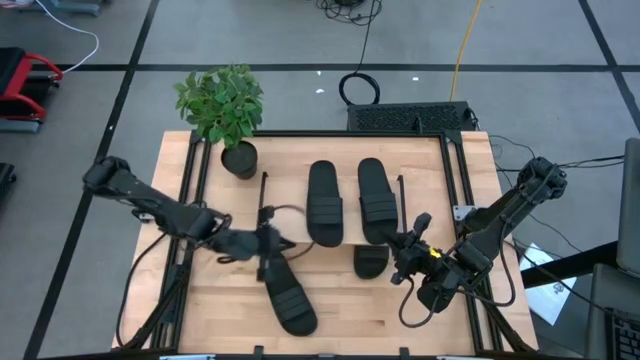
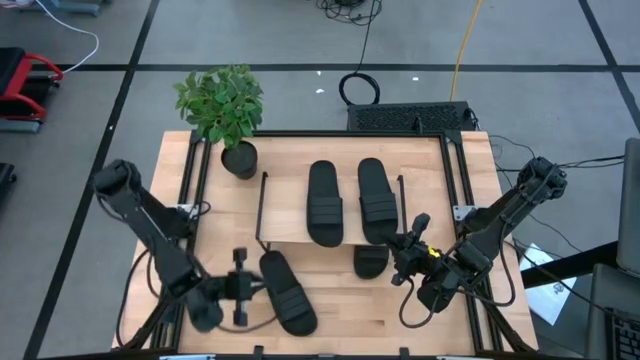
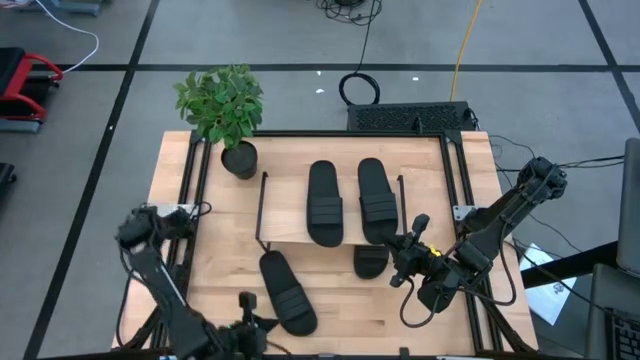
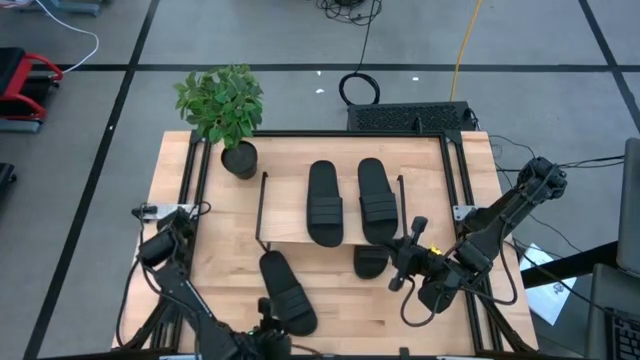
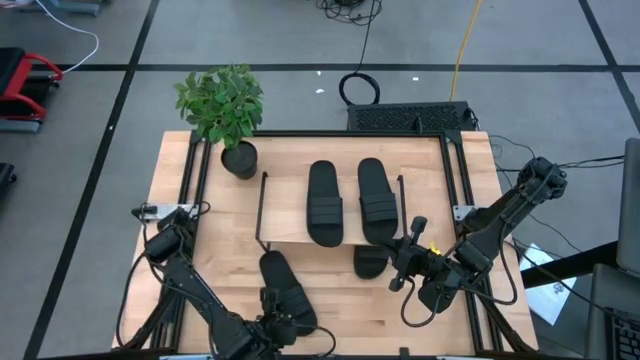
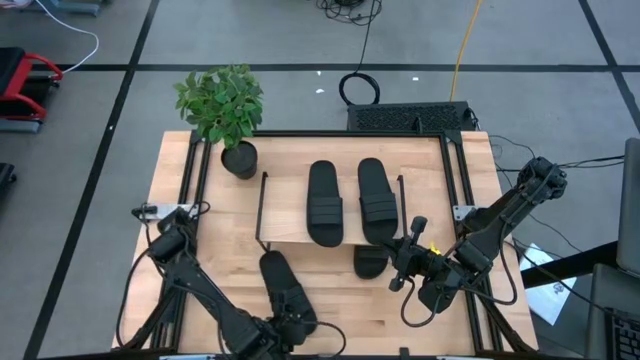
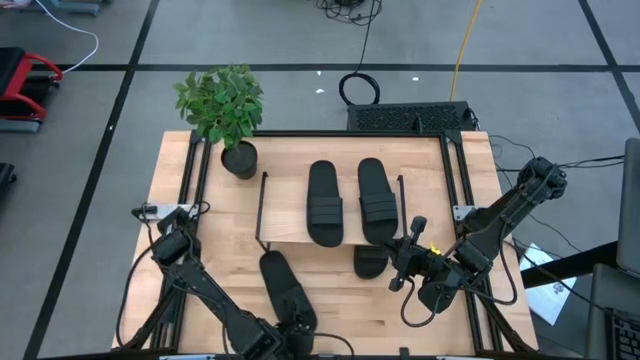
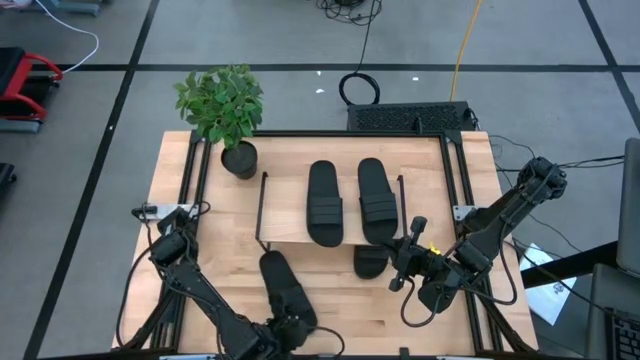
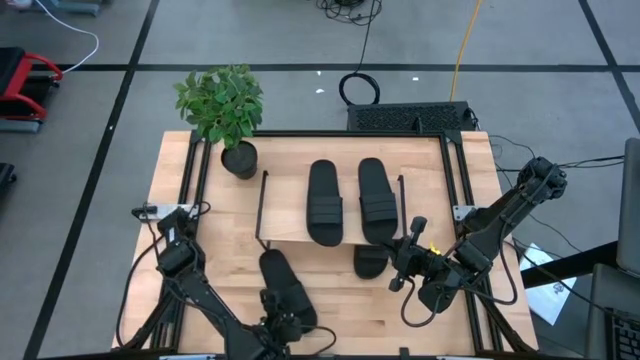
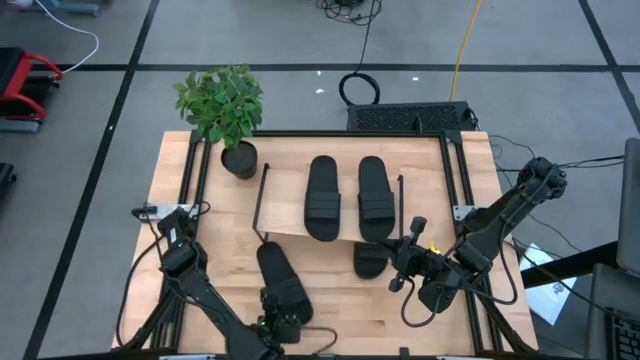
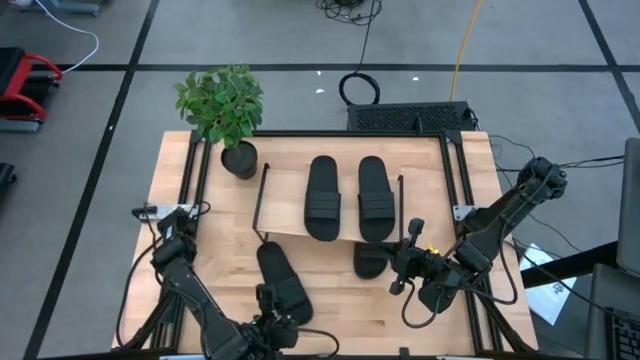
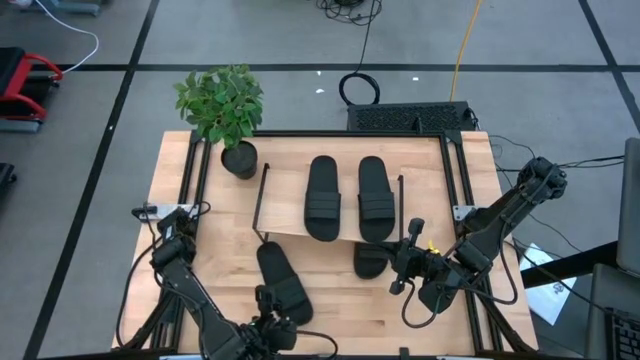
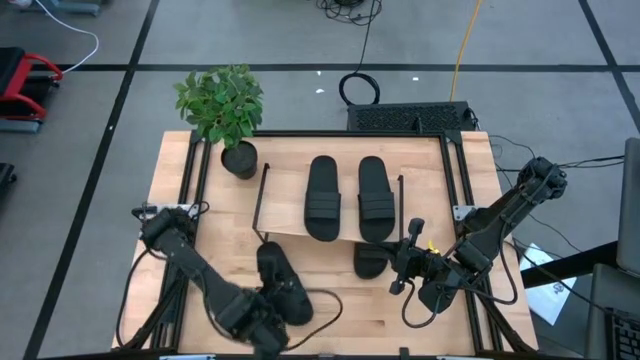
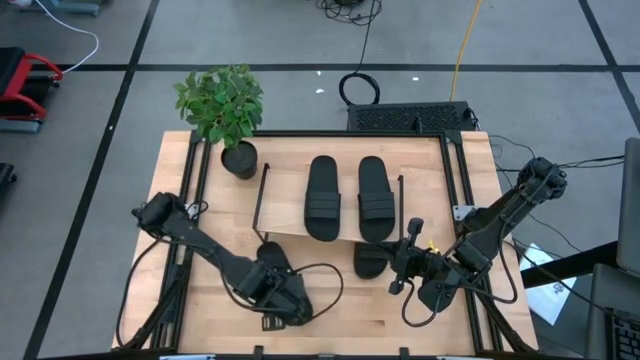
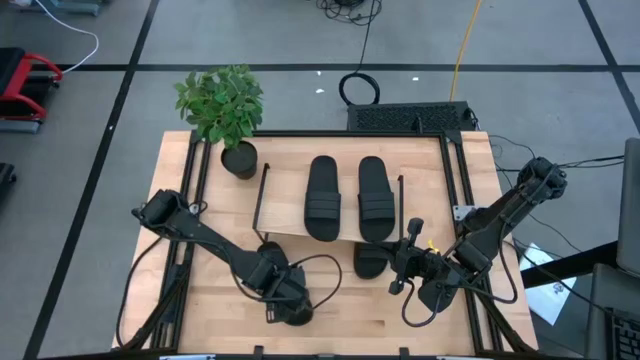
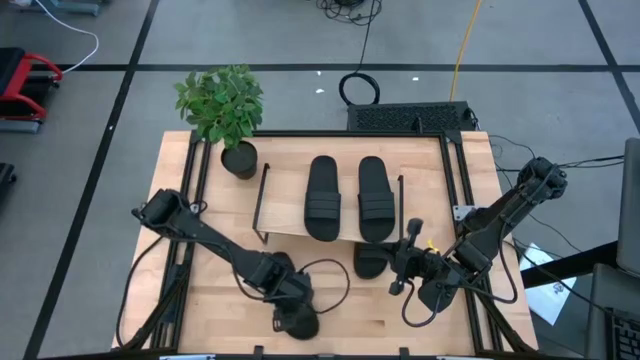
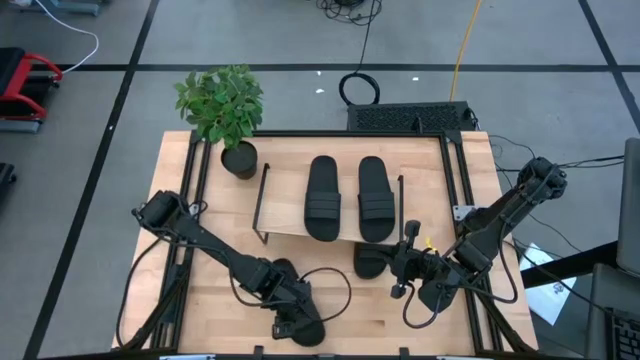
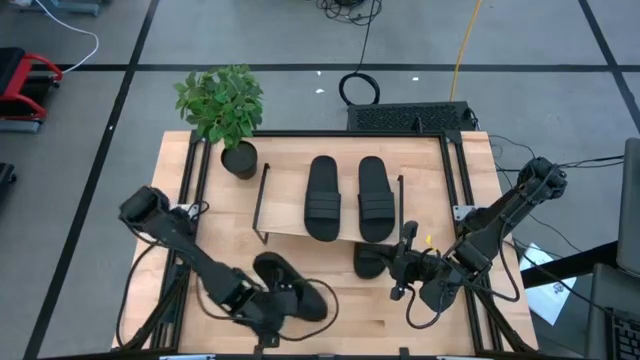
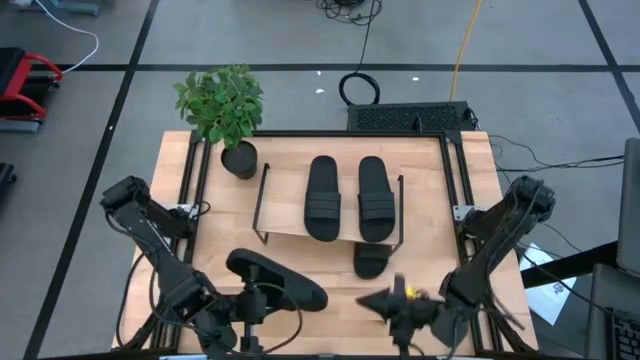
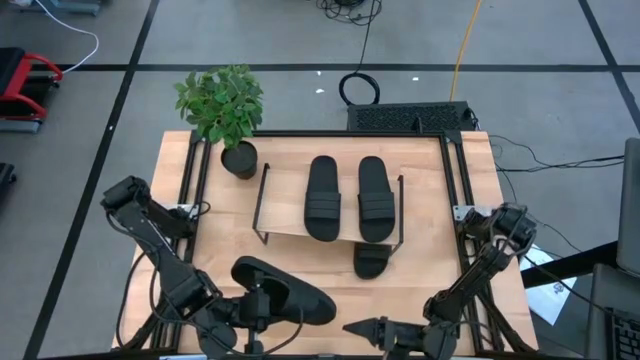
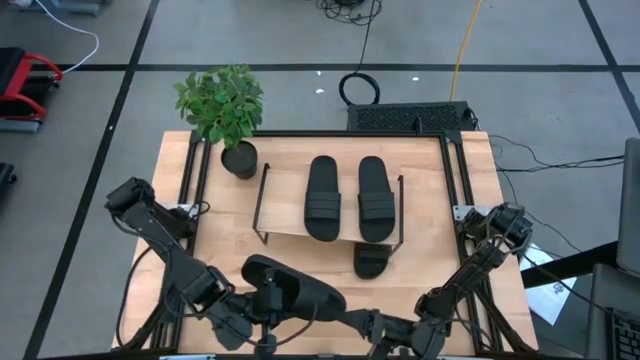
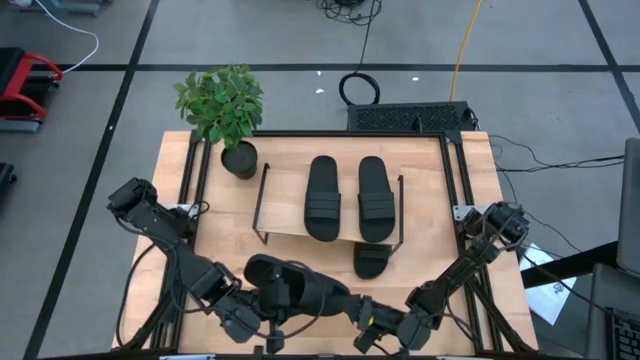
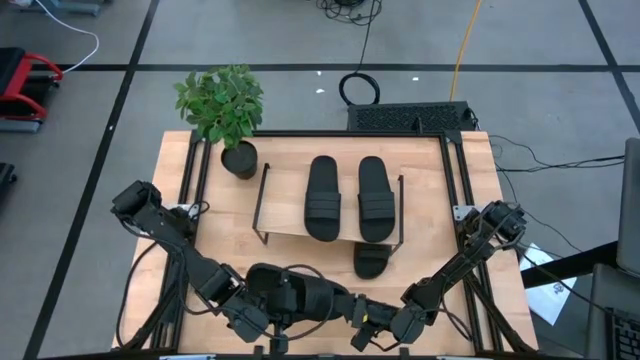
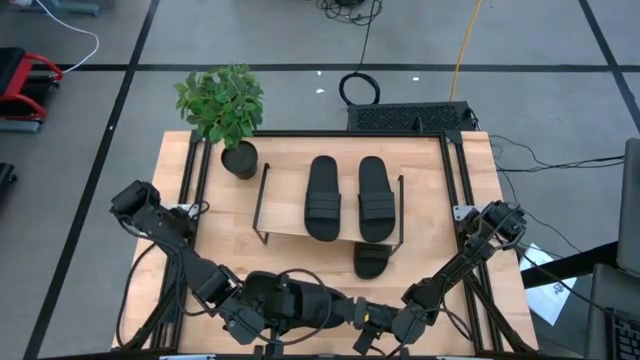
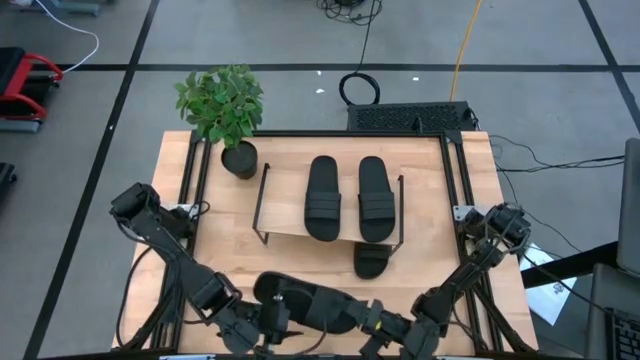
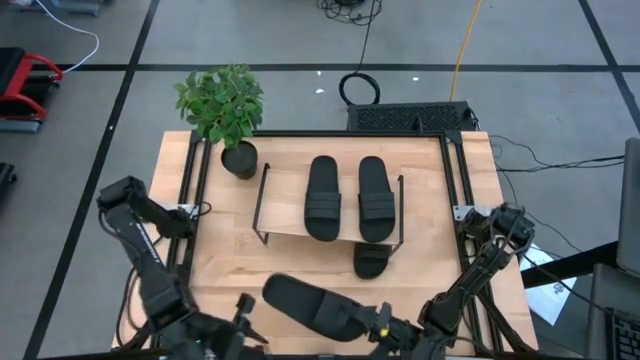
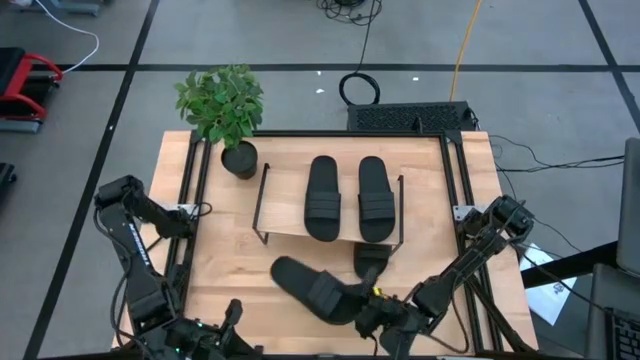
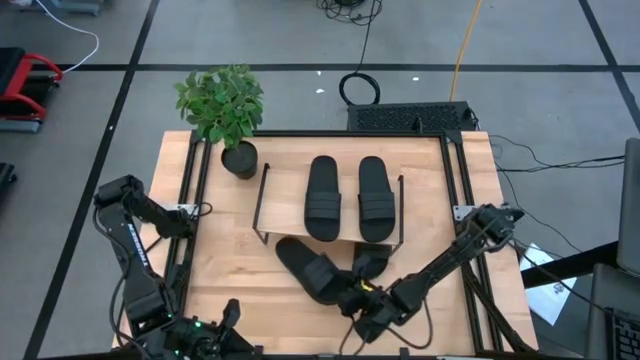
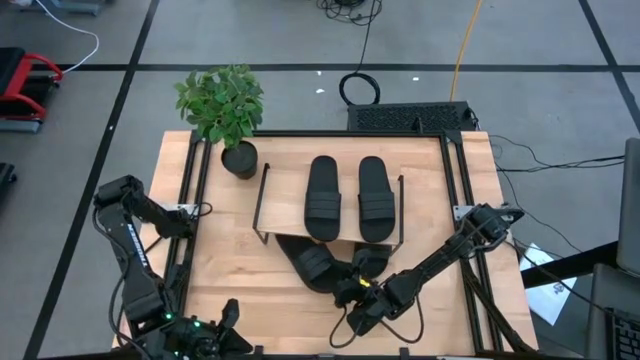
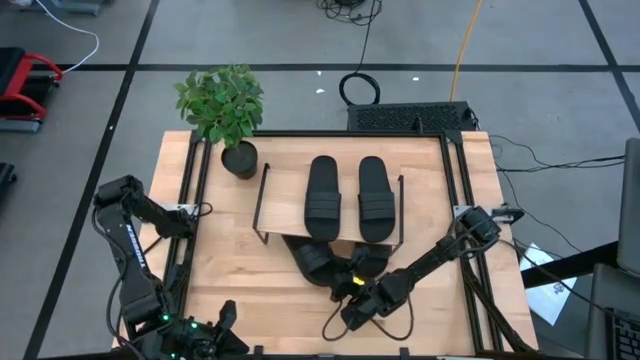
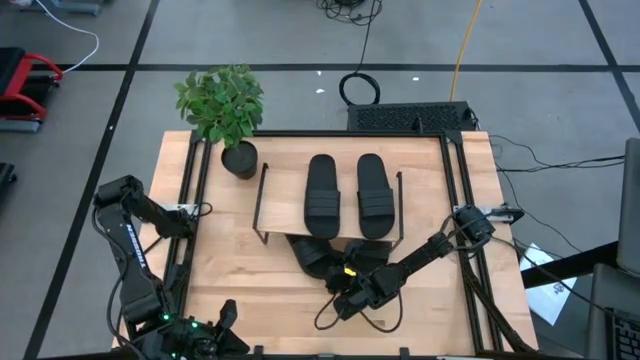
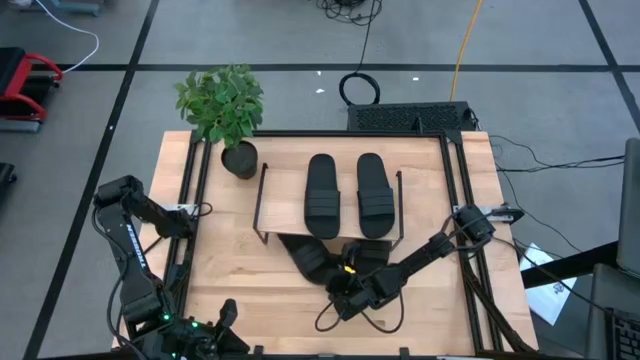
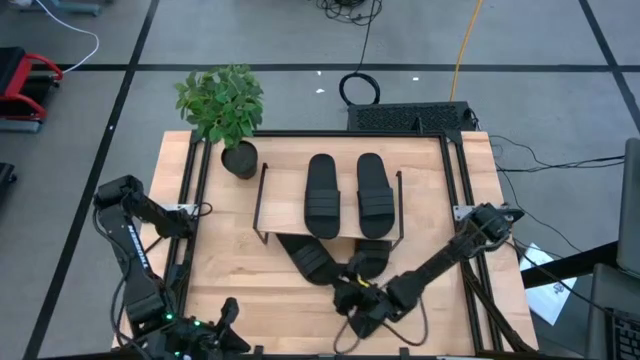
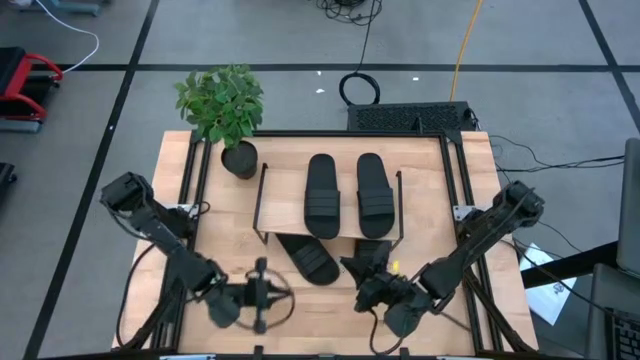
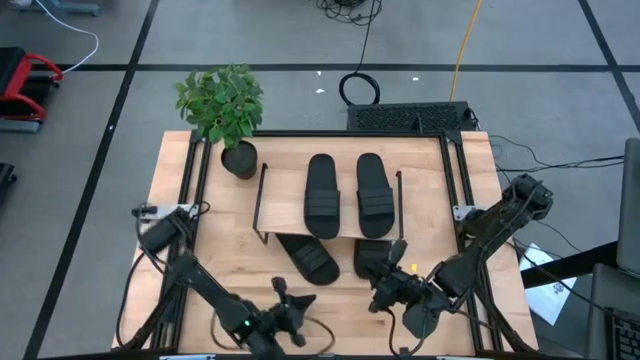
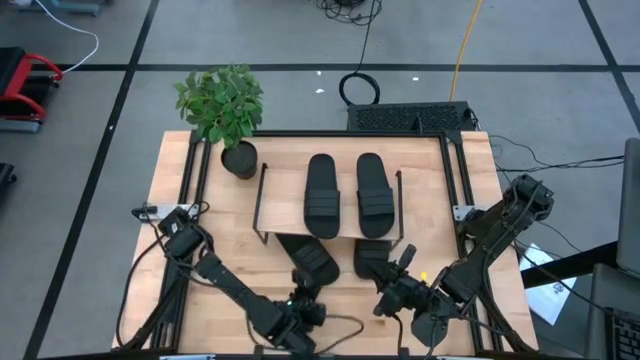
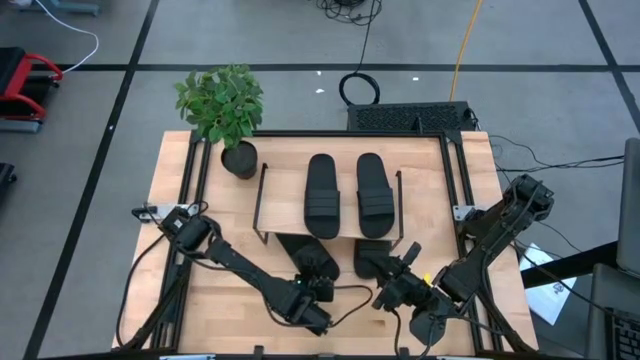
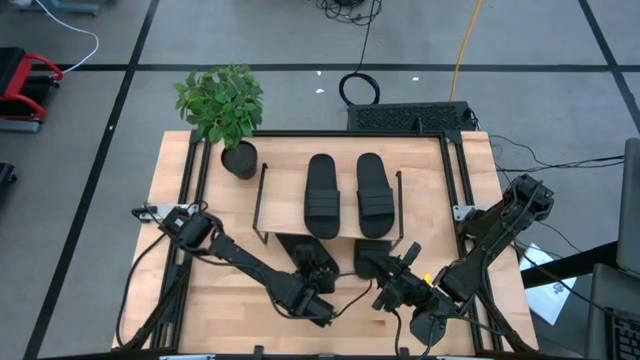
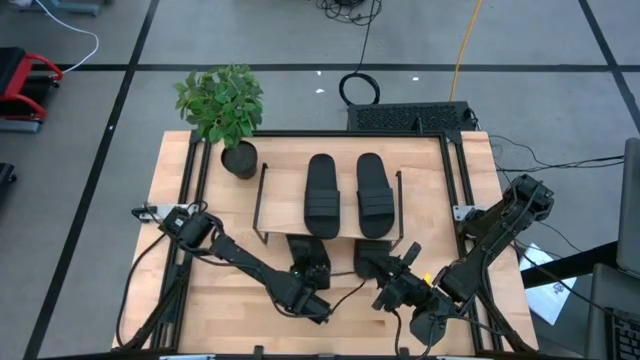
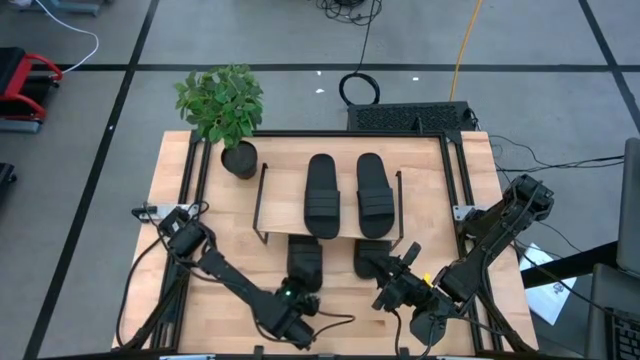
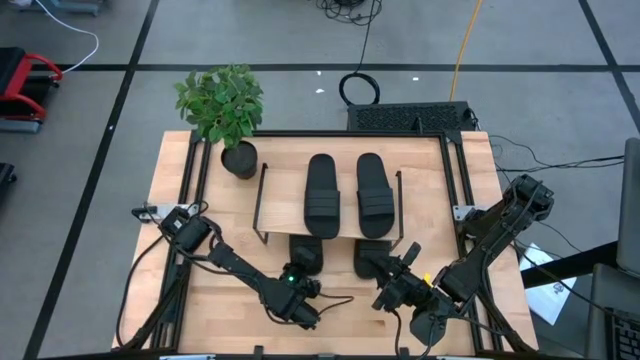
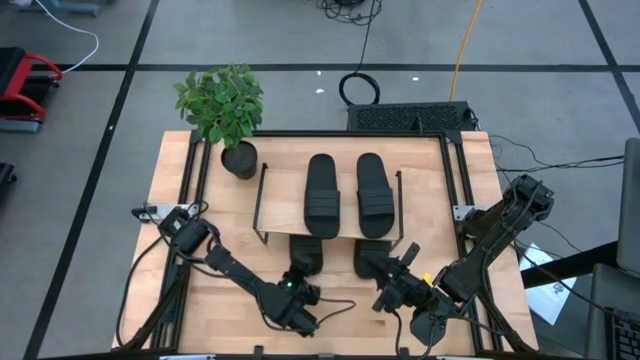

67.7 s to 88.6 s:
Task: Pick and place slides into the shelf
Put the black slide under the shelf
